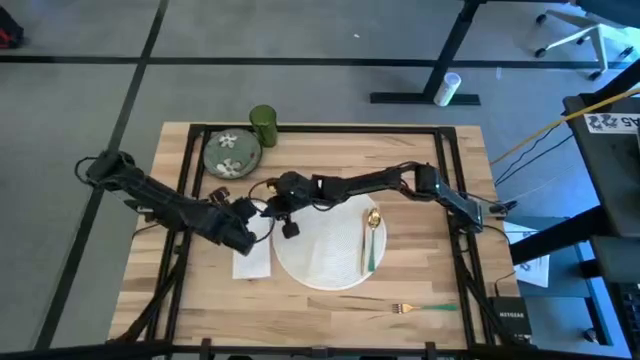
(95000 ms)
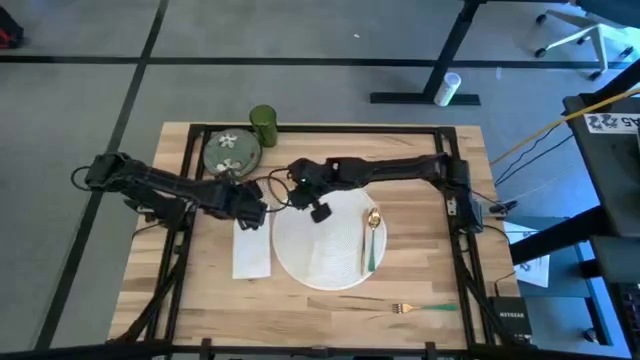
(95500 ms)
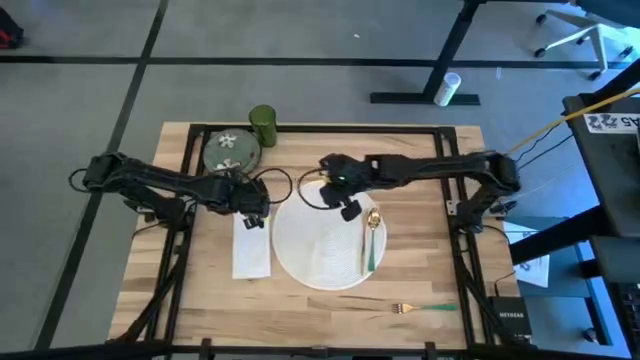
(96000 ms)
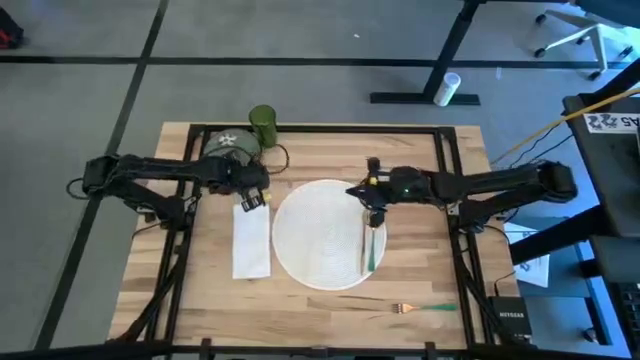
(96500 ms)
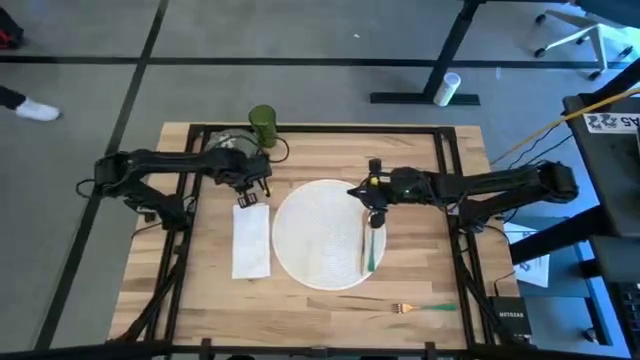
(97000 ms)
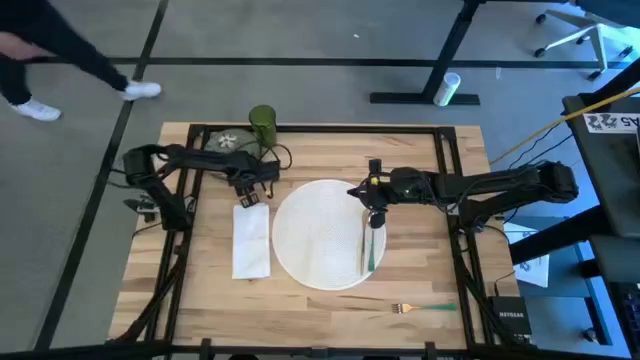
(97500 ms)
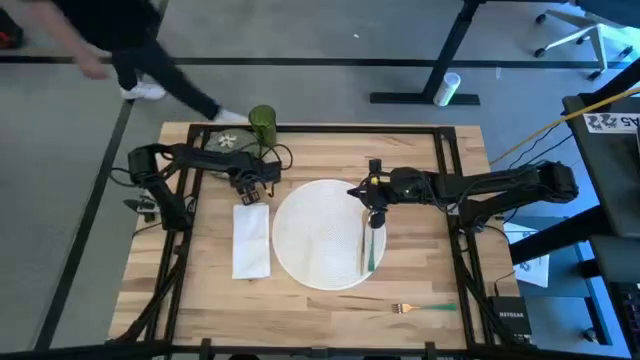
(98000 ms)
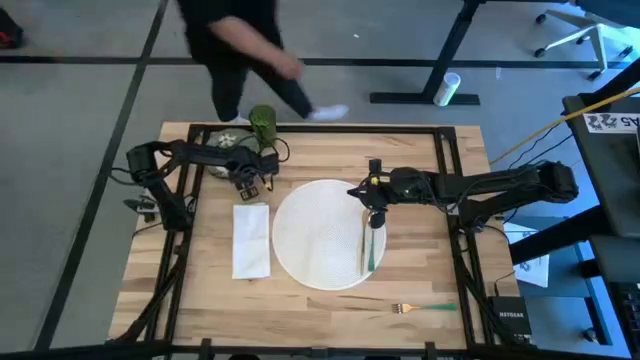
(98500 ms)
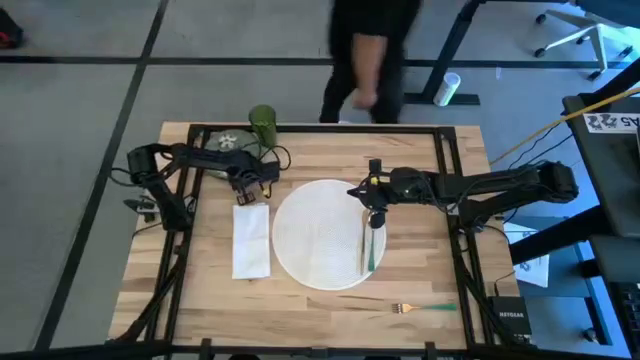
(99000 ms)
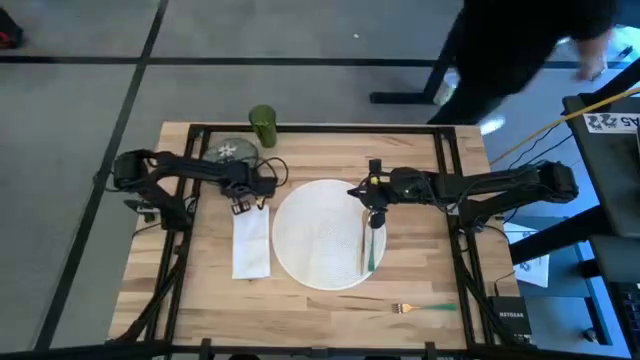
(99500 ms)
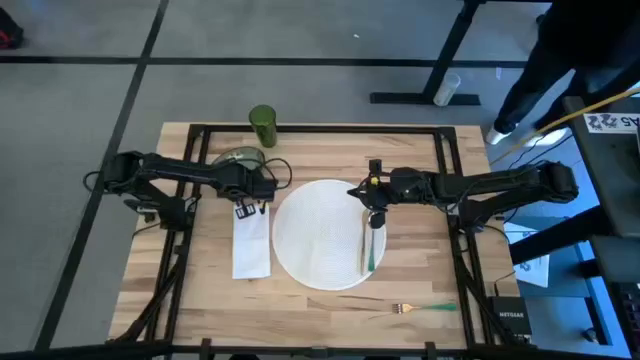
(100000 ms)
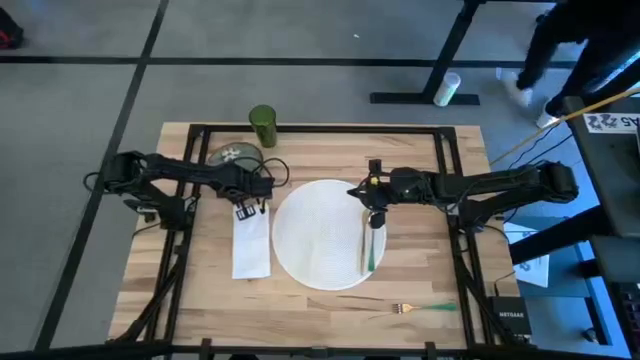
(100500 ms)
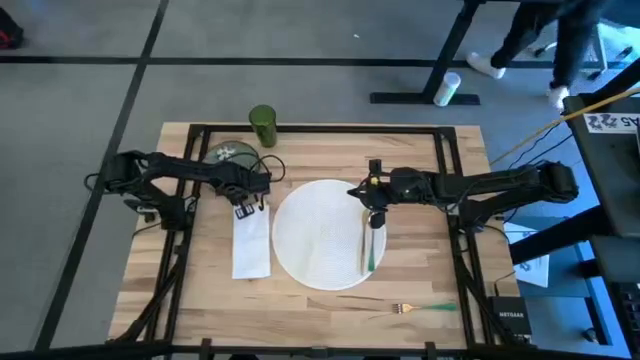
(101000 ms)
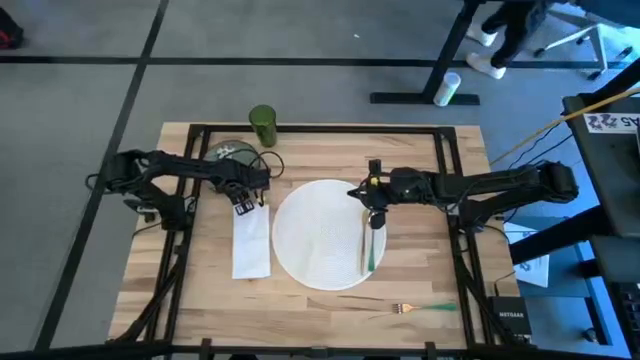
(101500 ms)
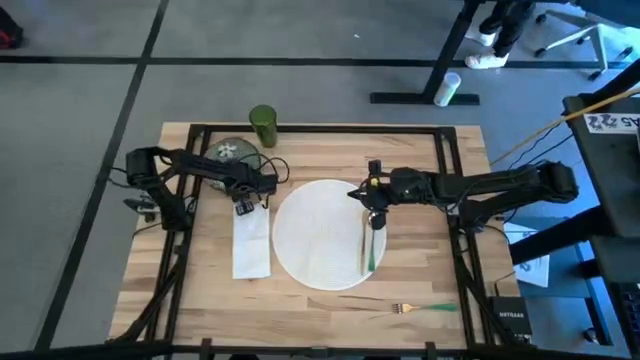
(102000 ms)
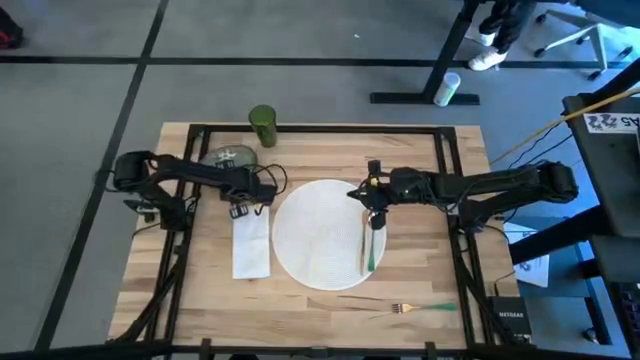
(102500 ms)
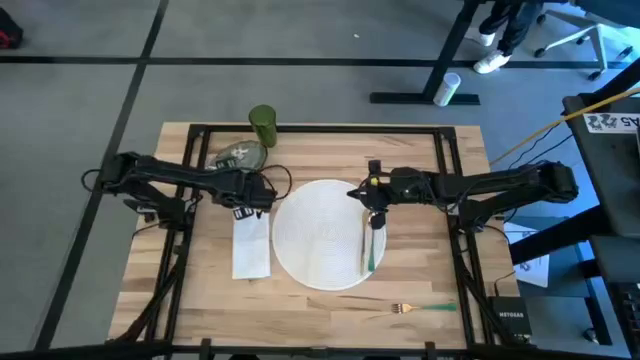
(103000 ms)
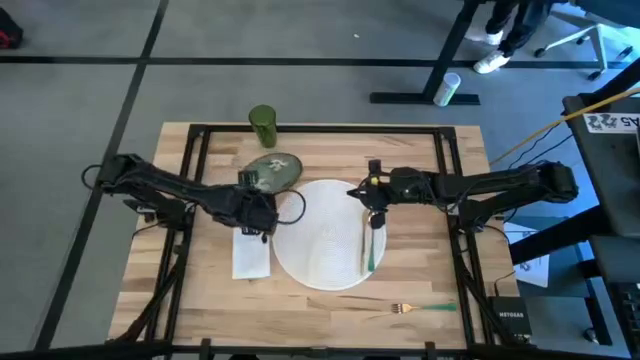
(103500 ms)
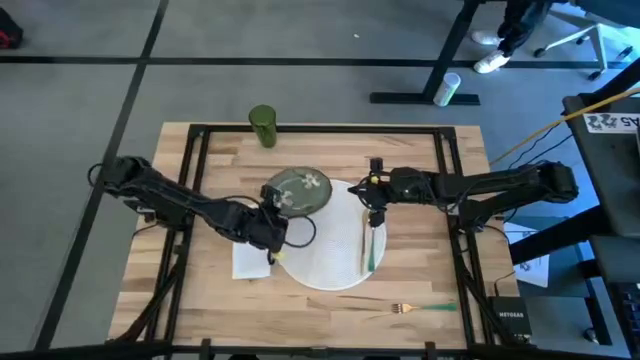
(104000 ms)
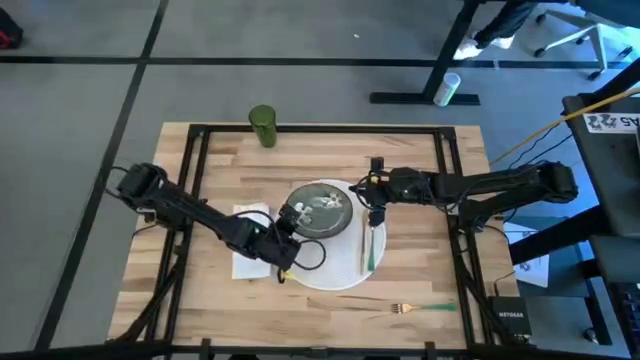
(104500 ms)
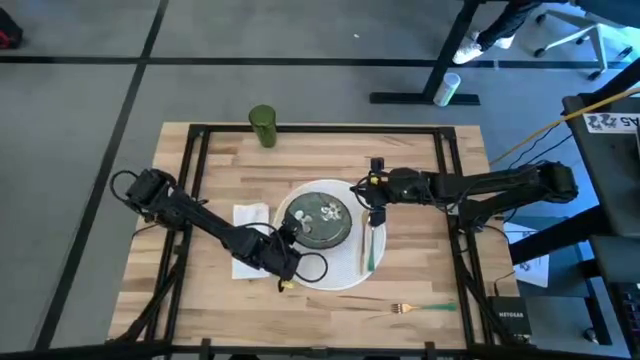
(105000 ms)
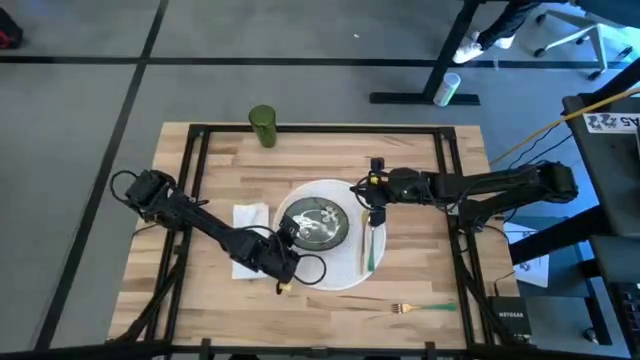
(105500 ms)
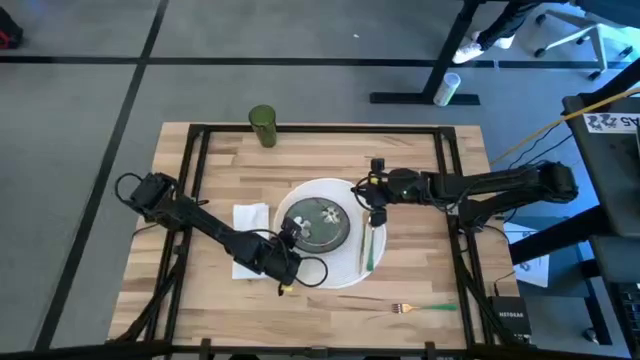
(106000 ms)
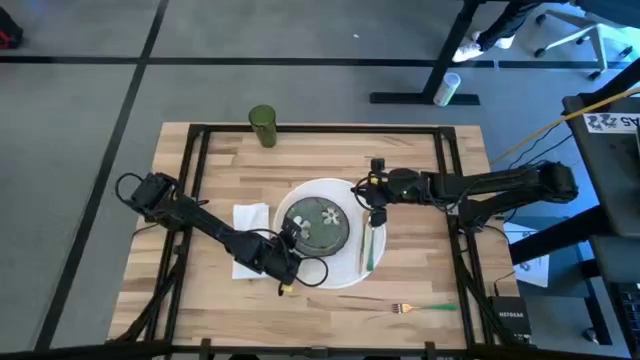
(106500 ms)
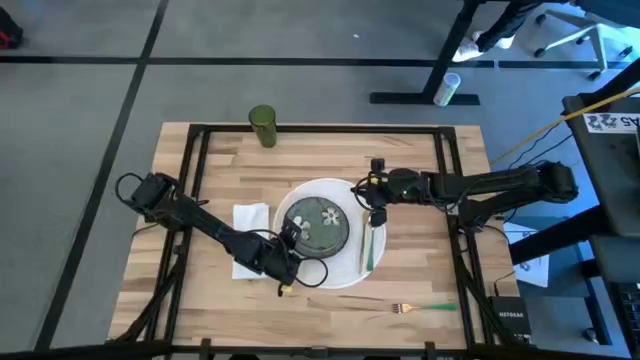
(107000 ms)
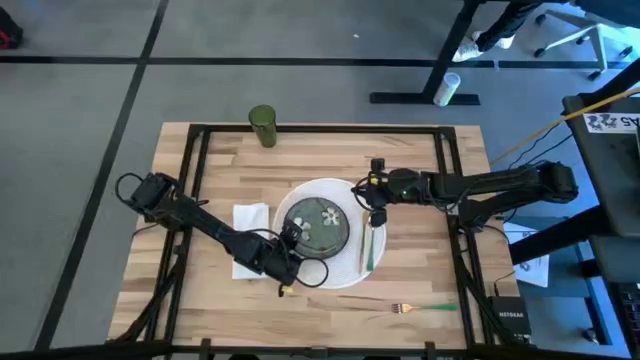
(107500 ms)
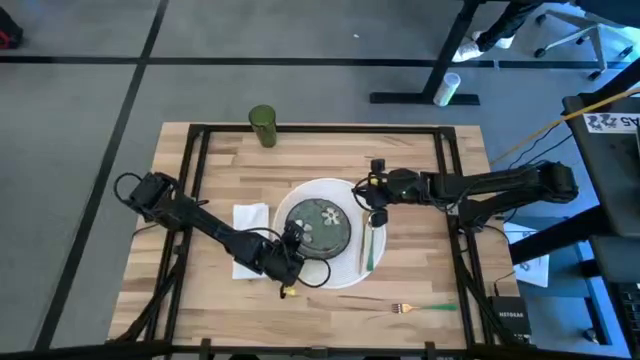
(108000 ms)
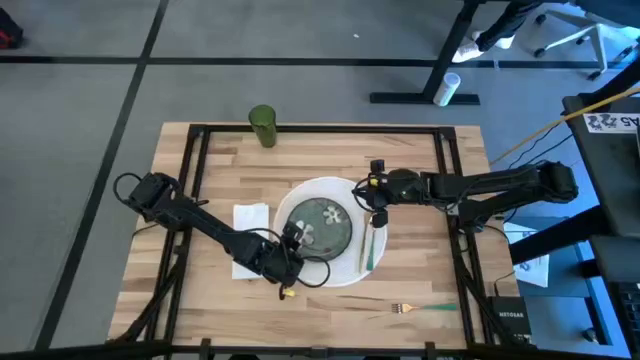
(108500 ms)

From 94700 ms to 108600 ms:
Task: Set table place
Put the green plate on the white table mat

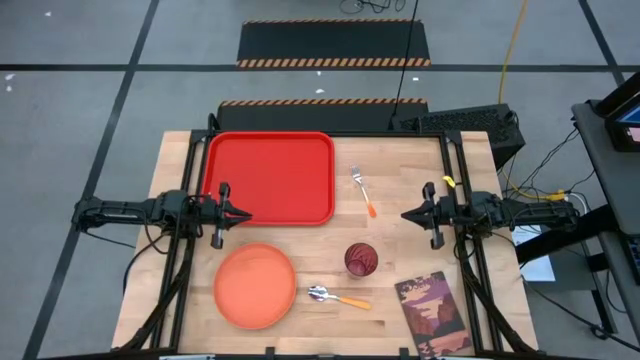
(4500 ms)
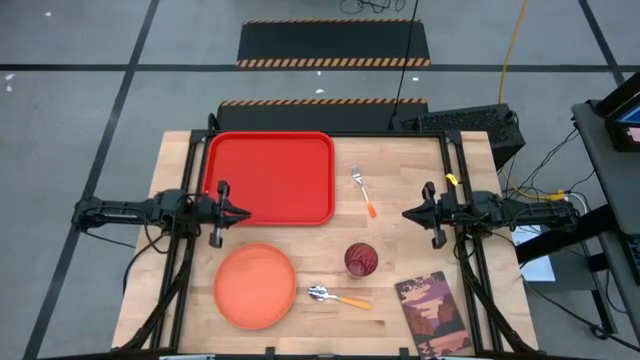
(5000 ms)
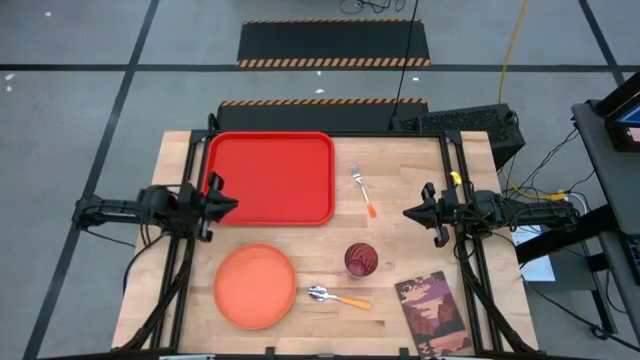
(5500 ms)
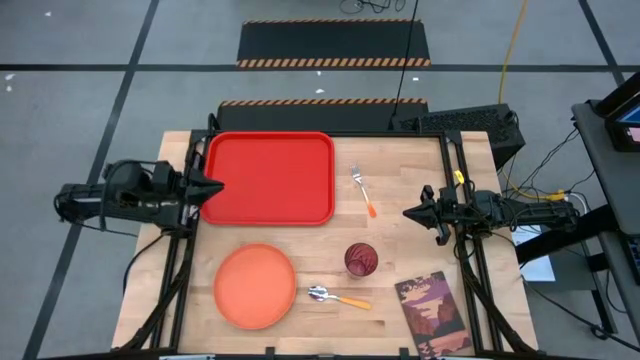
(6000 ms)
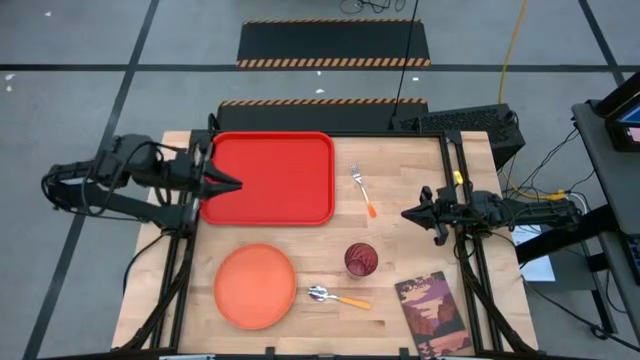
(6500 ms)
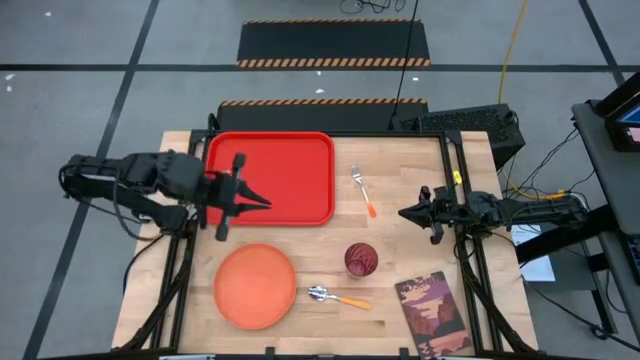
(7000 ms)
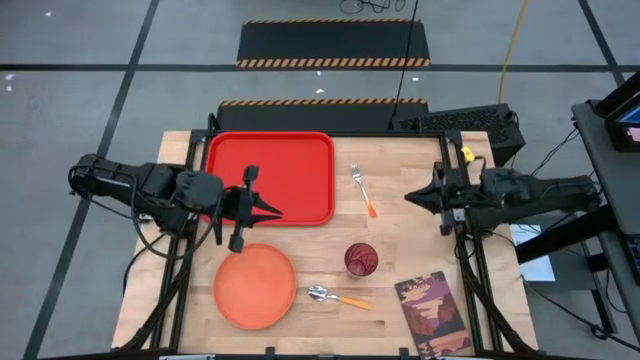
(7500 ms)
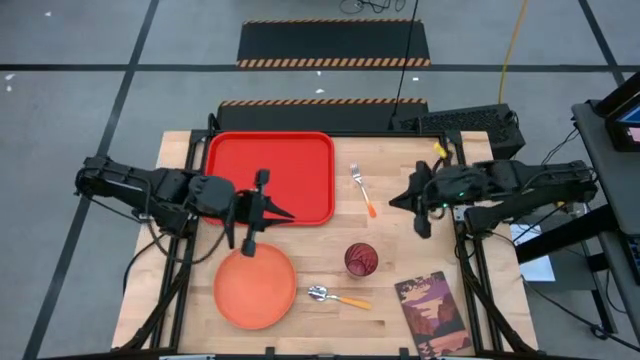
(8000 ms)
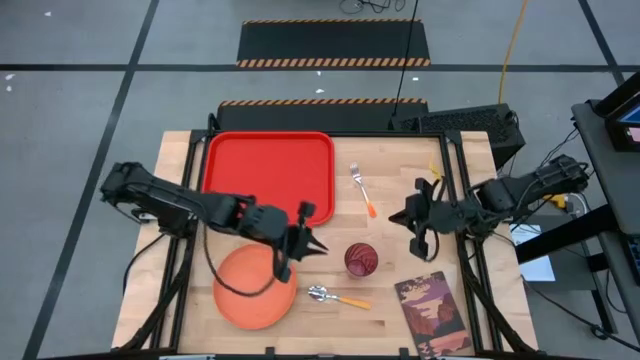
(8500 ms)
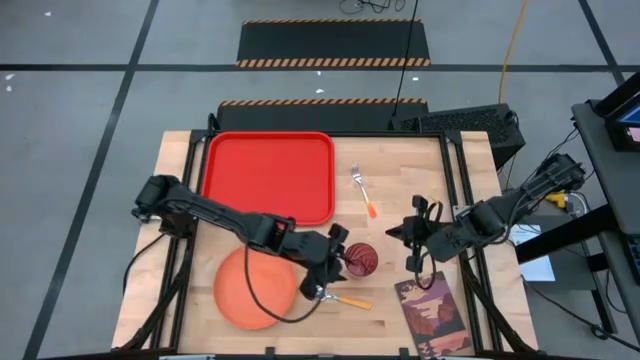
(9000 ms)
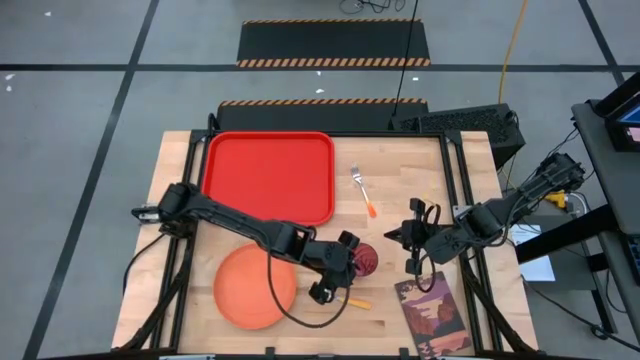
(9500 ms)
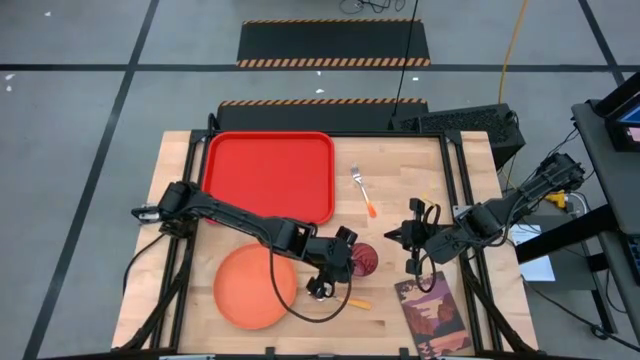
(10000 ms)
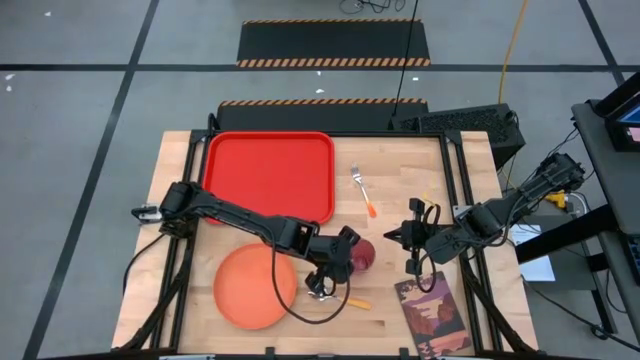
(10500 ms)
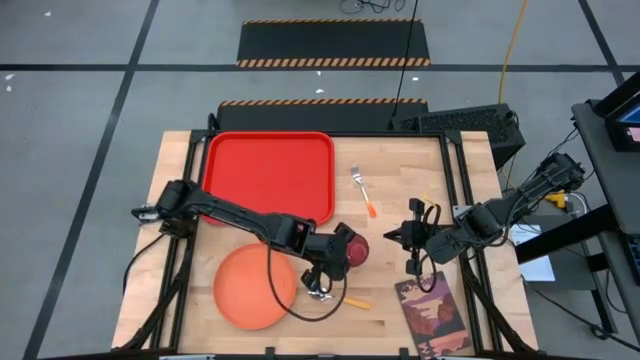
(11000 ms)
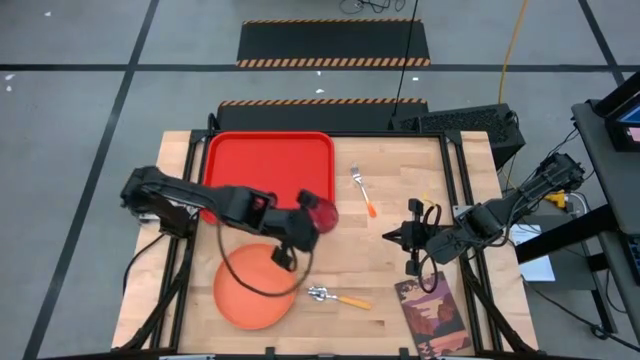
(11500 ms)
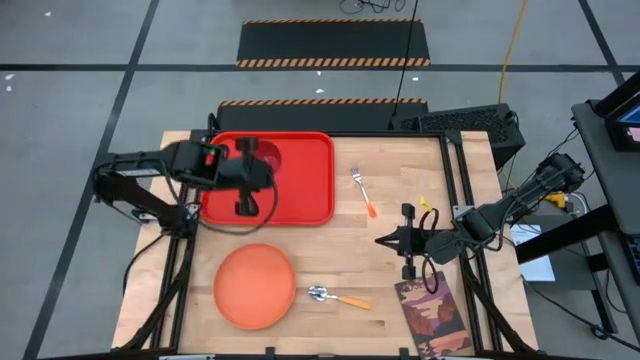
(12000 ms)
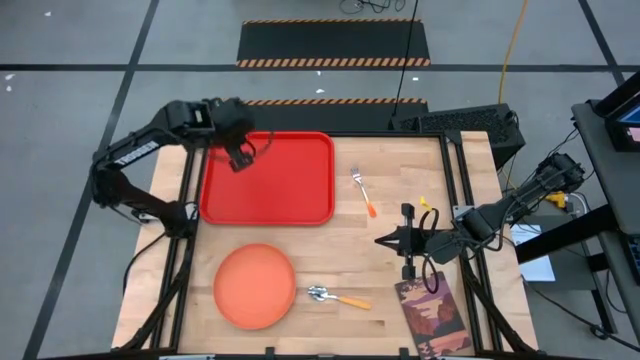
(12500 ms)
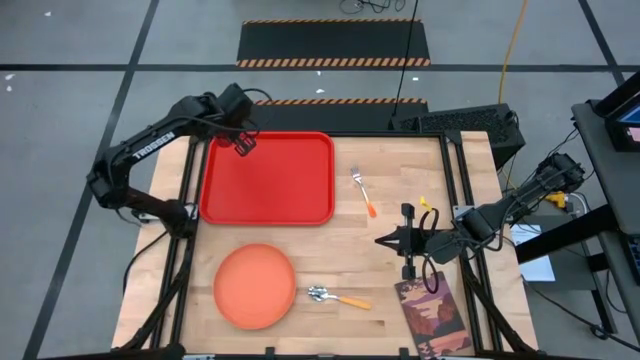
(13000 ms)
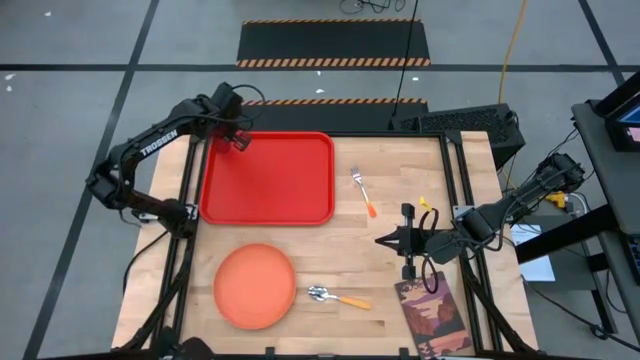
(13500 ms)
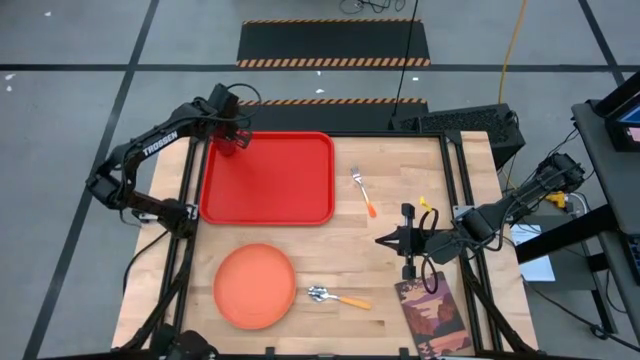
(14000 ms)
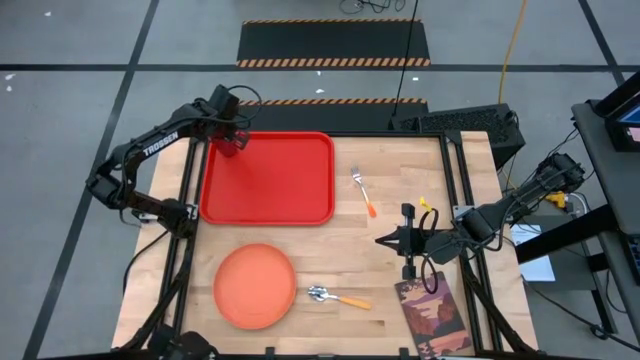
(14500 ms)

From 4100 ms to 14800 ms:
Task: Pick and place plate/cup/fork/spoon on tray
Put the red cup on the orange tray
